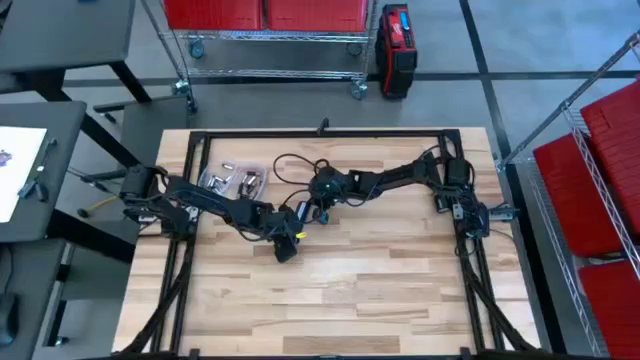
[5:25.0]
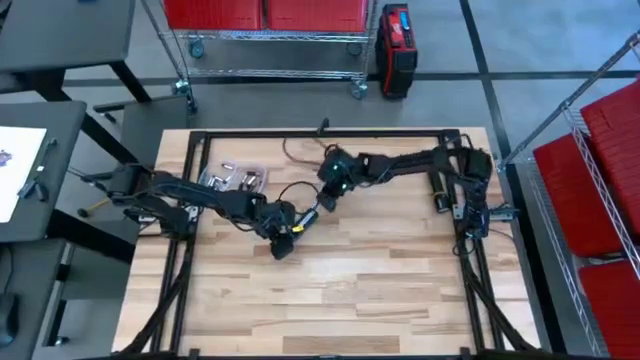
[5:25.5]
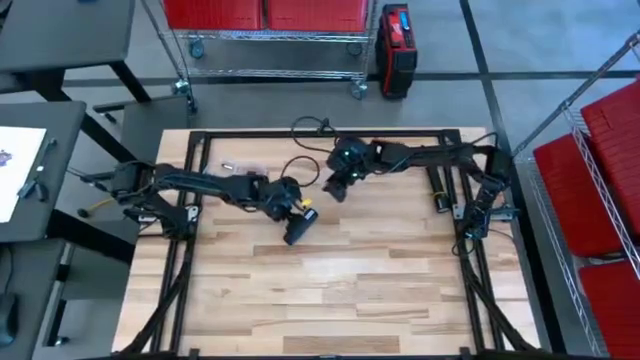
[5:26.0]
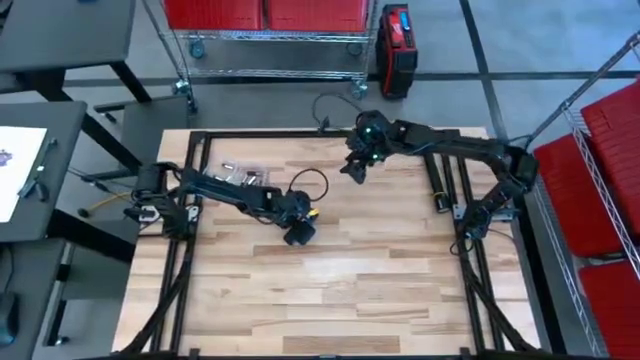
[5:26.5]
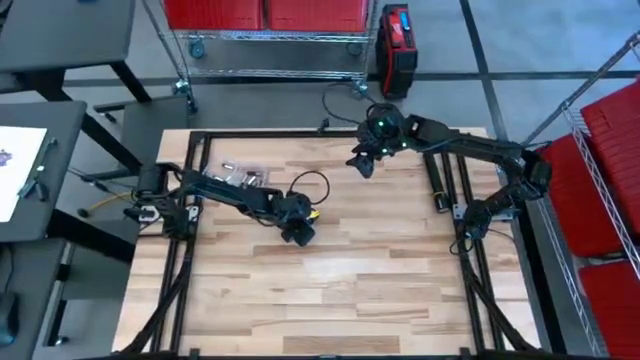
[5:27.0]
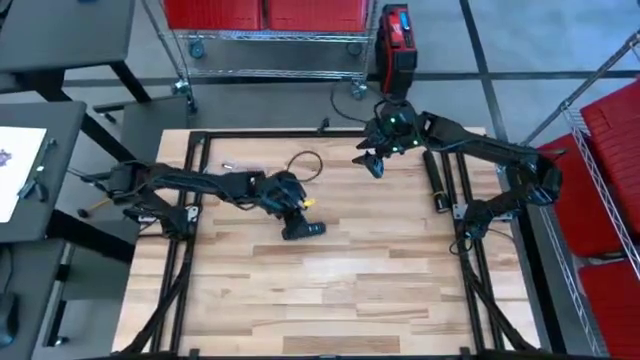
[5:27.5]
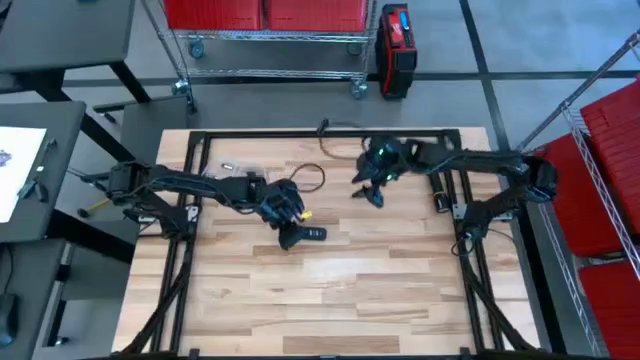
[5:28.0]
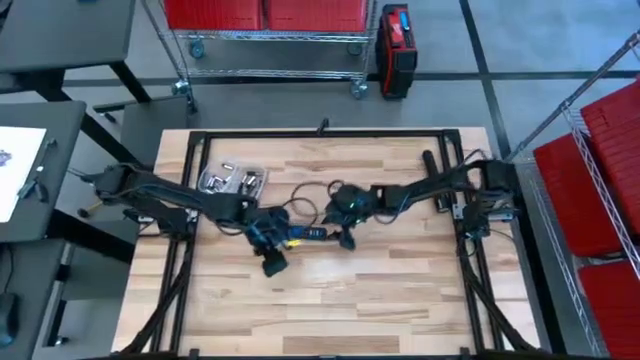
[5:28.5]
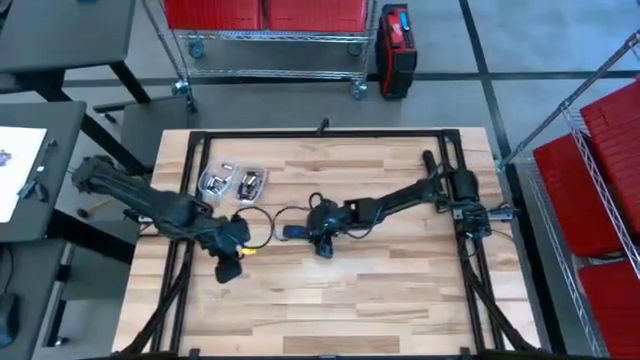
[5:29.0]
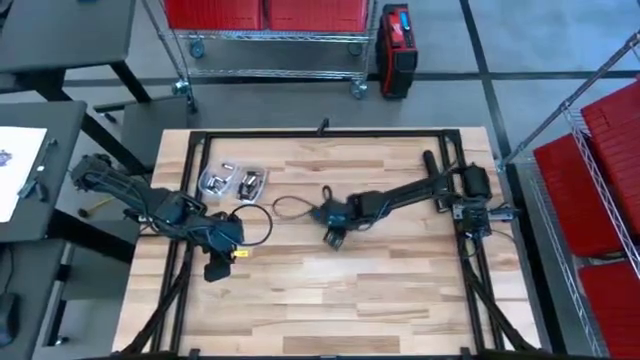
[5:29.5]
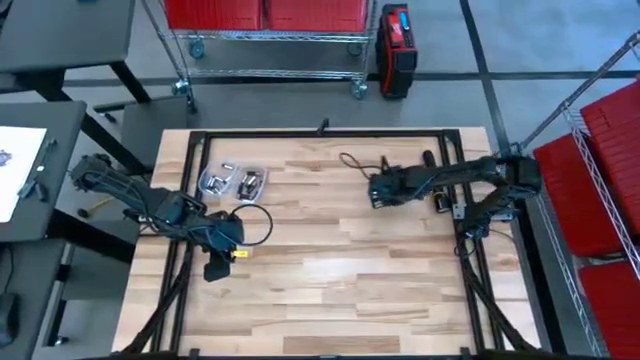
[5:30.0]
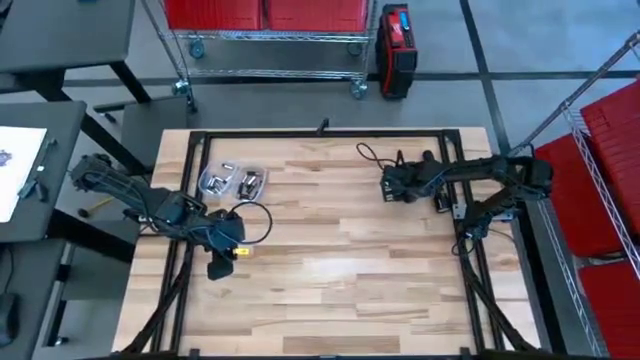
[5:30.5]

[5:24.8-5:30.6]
Task: Insert battery
Move the remote beside the flashlight

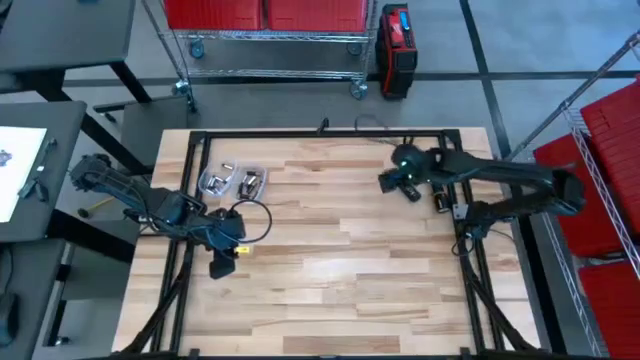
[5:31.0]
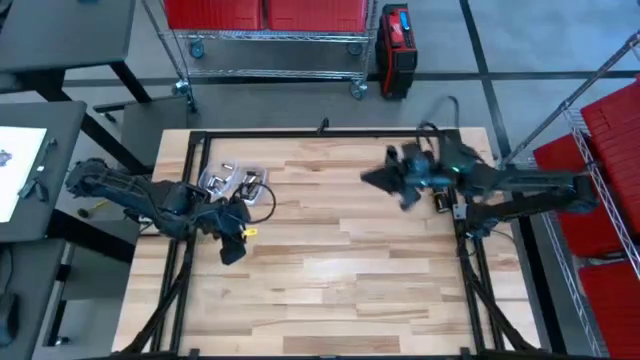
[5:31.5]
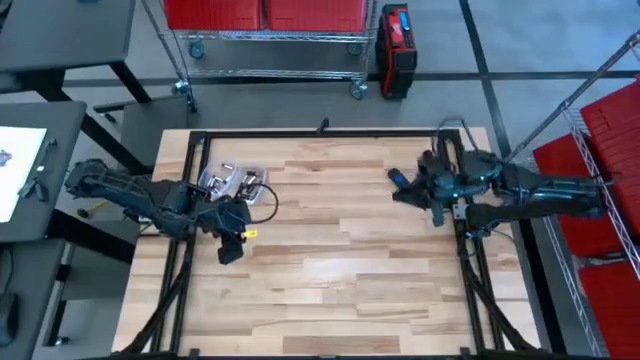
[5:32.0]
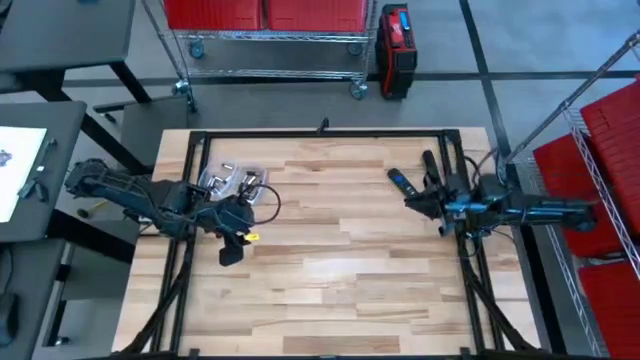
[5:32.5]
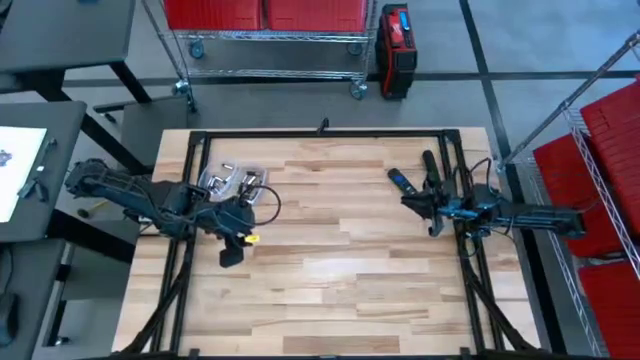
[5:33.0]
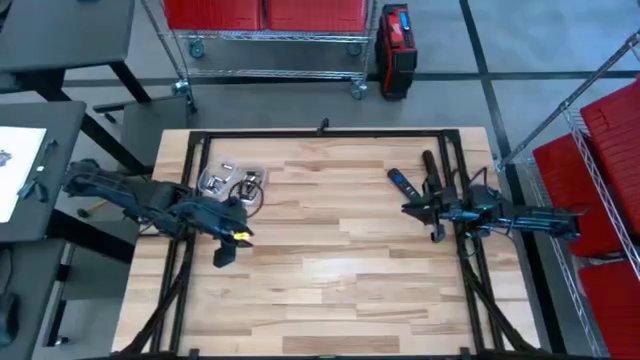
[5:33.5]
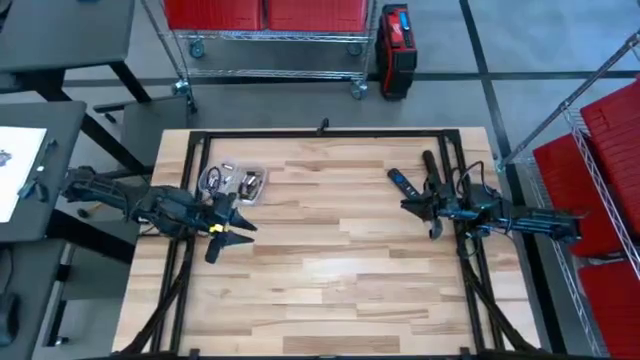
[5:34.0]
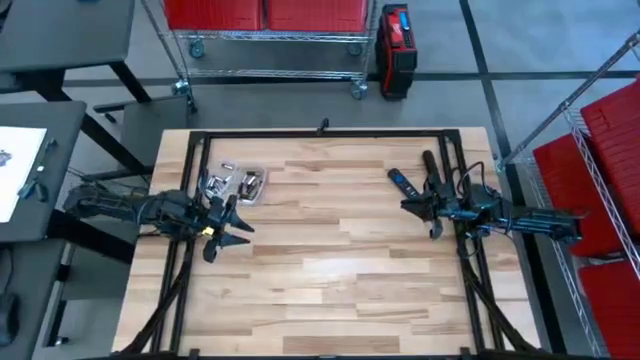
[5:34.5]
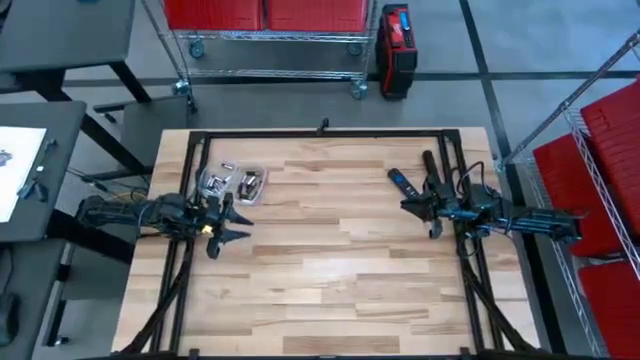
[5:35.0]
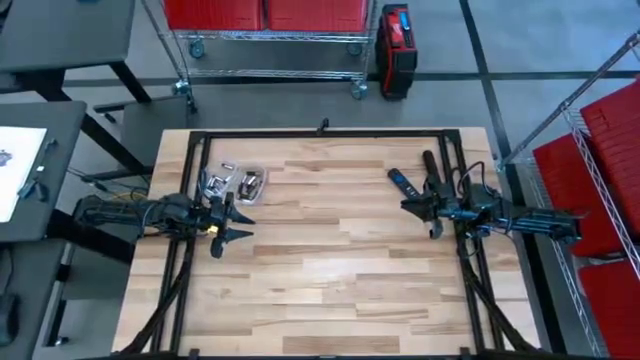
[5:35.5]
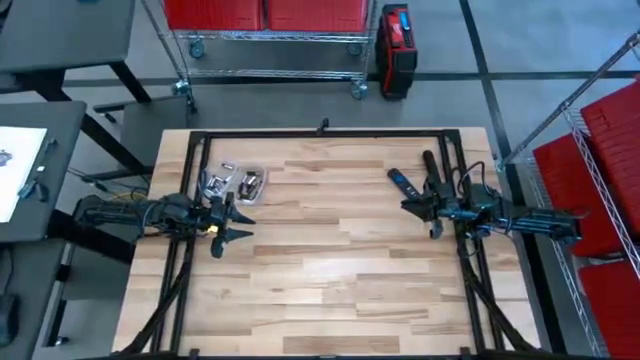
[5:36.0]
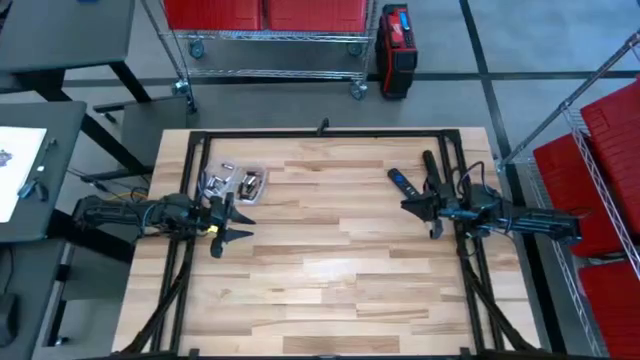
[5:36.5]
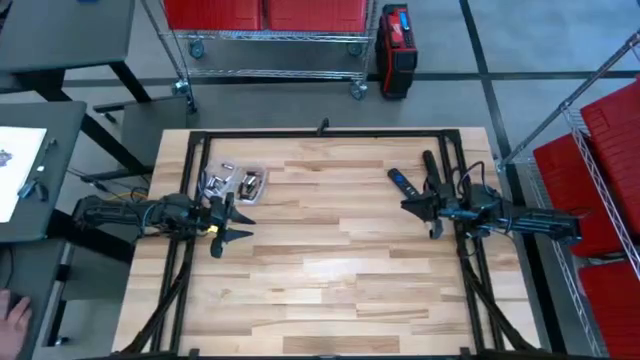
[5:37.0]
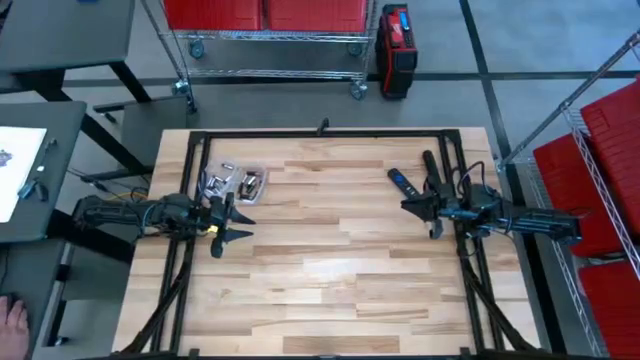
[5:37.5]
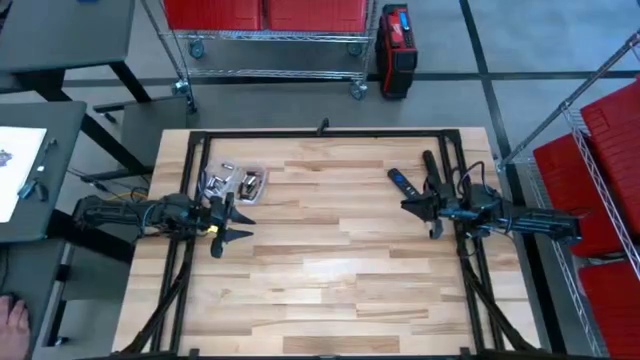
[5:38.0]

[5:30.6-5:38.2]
Return to Home Position

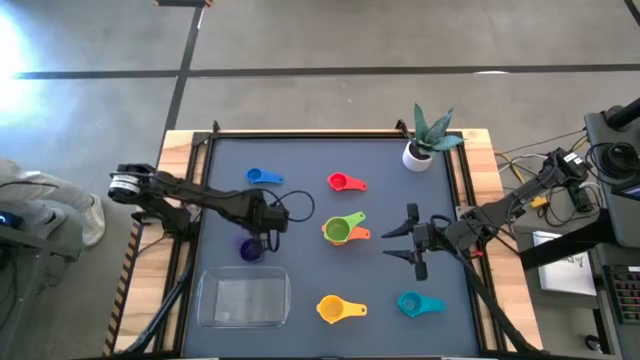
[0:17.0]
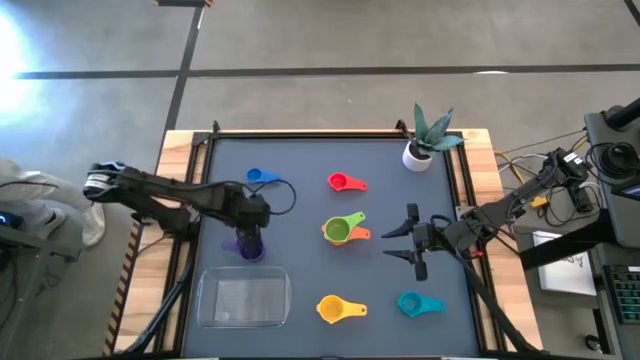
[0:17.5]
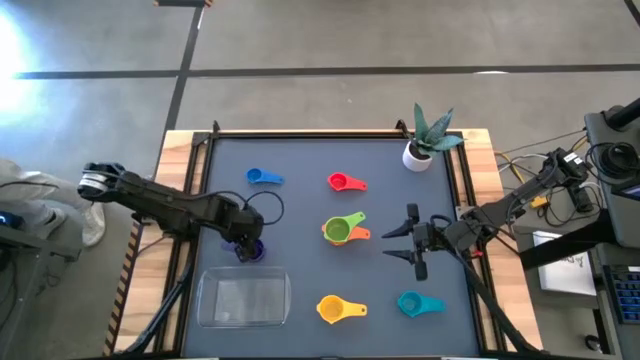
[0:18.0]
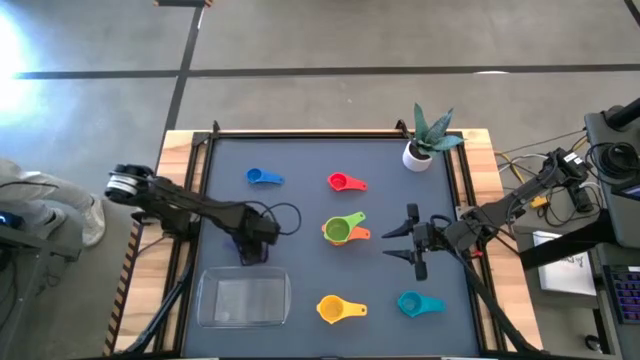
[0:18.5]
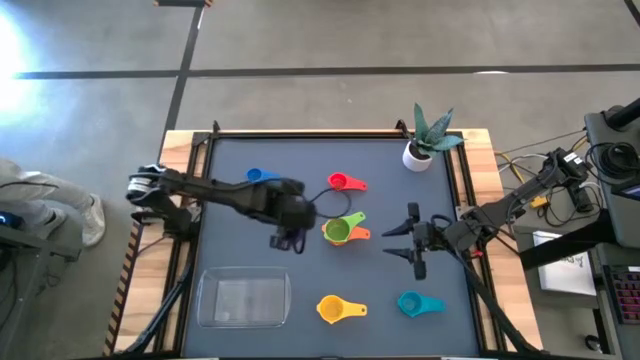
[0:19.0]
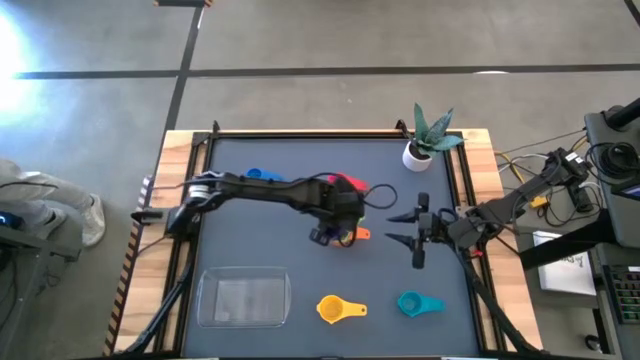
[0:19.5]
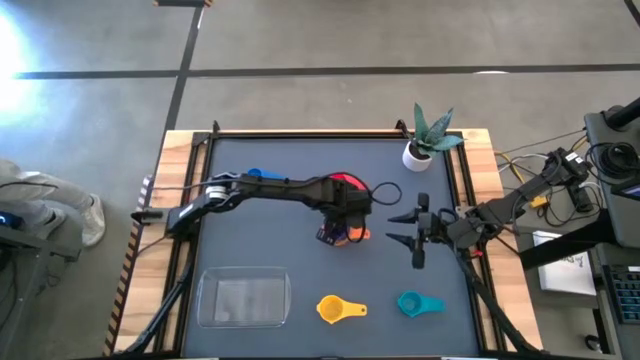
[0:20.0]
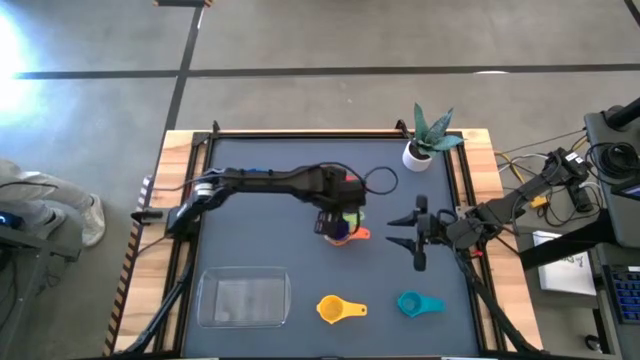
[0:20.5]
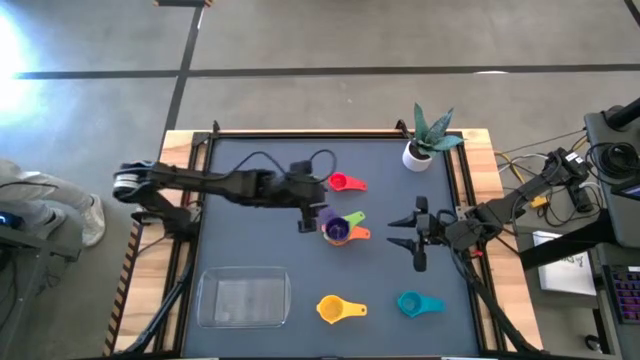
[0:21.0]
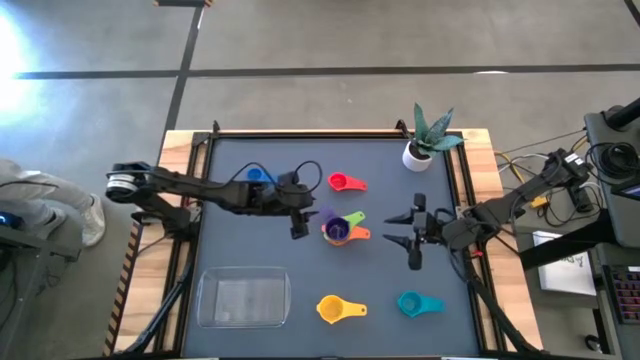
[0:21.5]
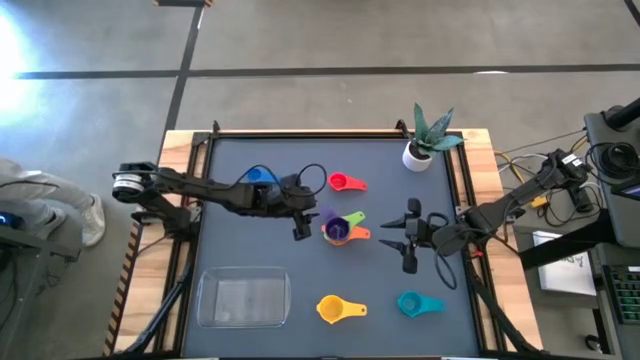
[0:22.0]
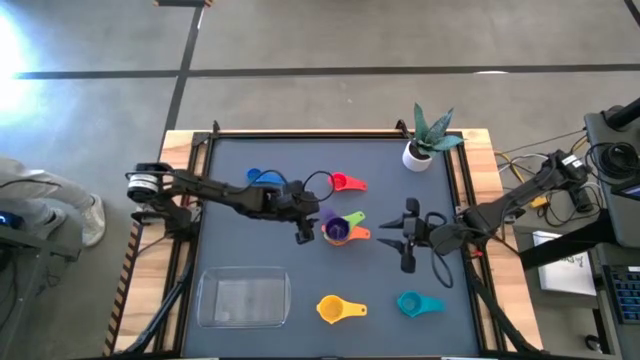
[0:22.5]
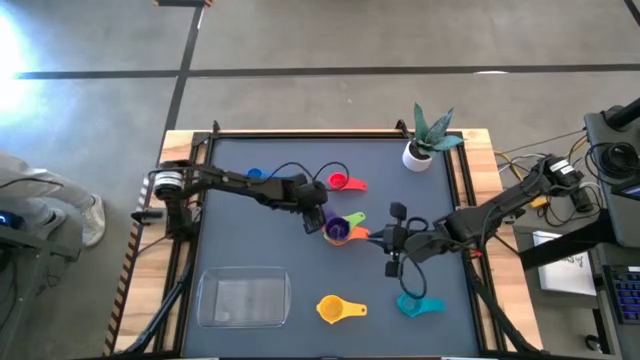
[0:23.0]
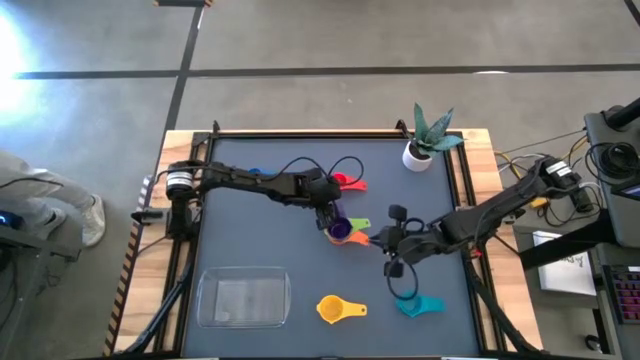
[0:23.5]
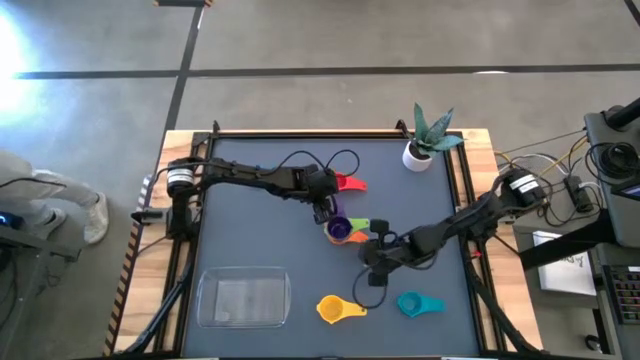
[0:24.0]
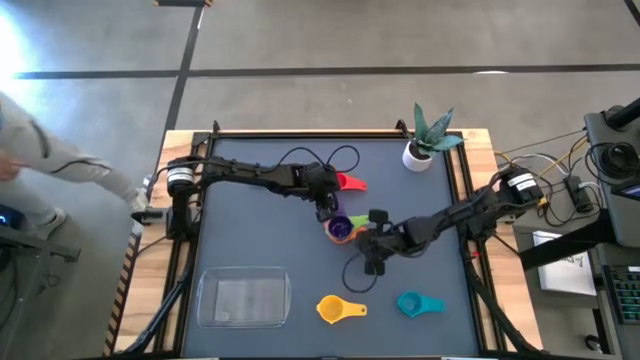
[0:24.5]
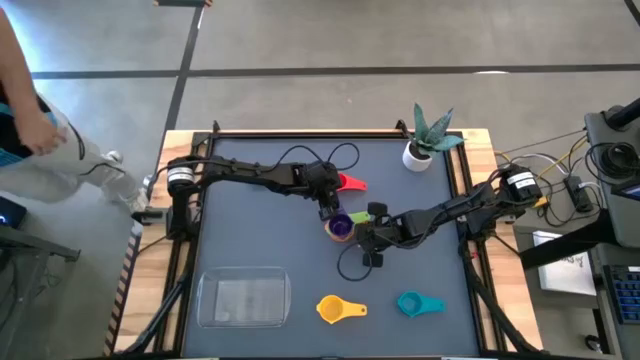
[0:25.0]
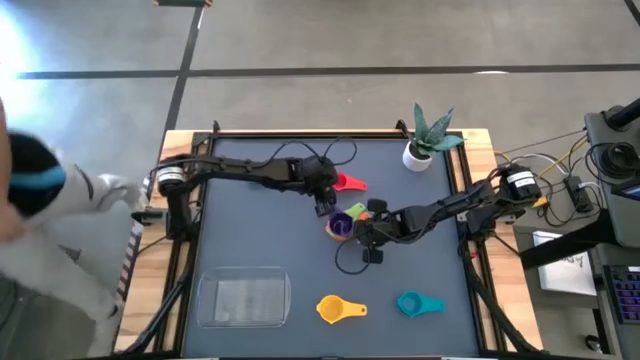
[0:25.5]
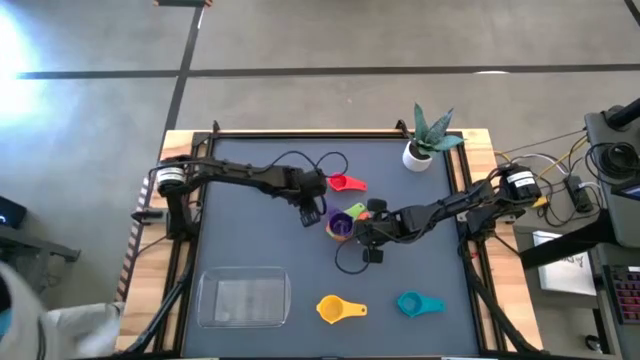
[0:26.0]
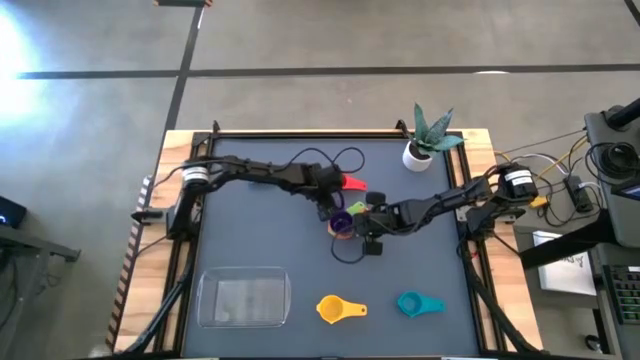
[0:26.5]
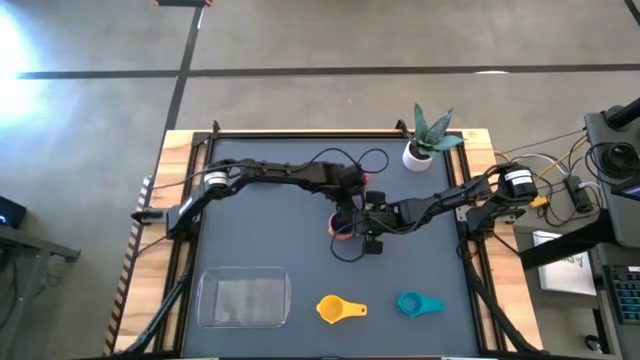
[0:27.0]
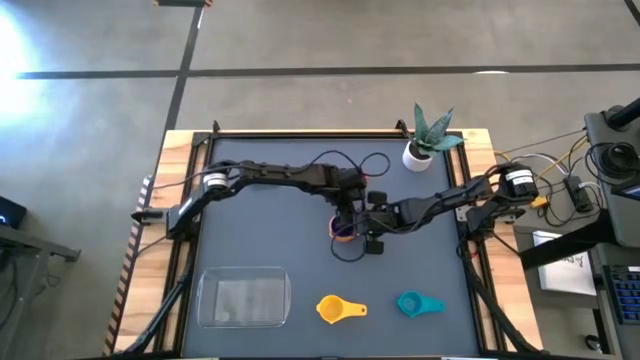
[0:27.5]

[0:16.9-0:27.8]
Task: Nest measuring cups in basket
Stack the violet measuring cup on top of the green measuring cup
